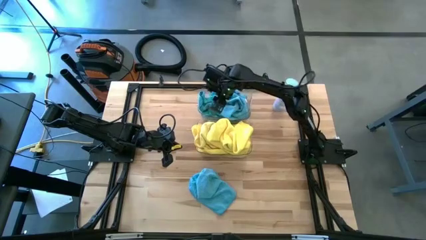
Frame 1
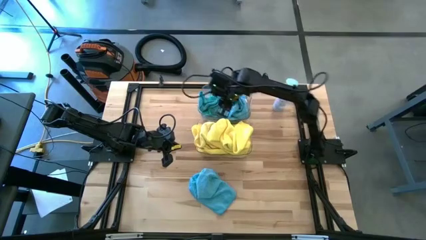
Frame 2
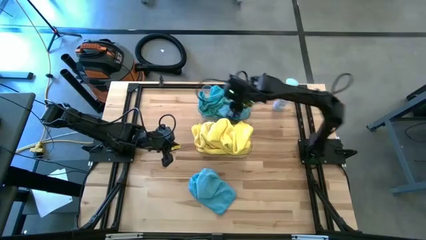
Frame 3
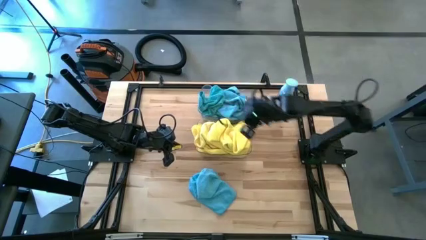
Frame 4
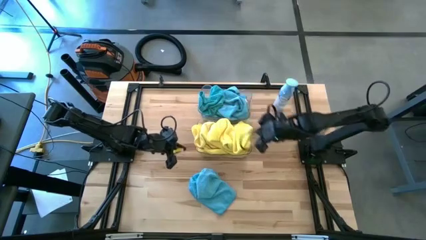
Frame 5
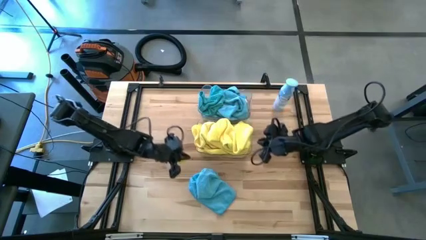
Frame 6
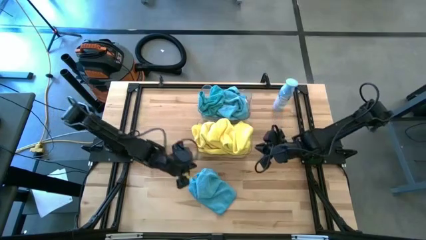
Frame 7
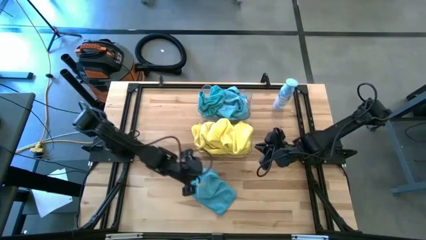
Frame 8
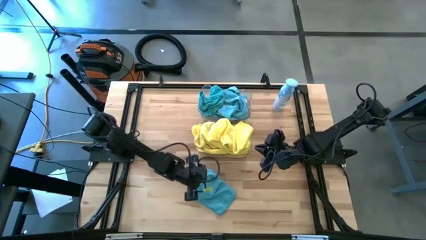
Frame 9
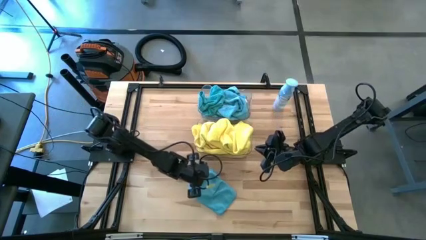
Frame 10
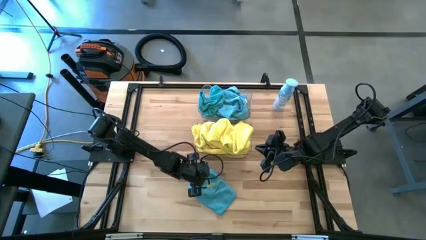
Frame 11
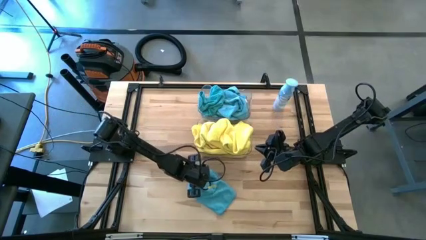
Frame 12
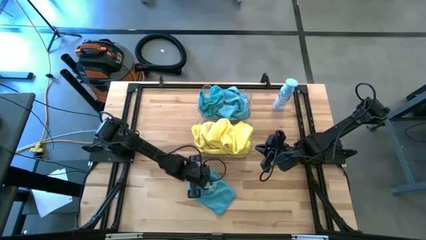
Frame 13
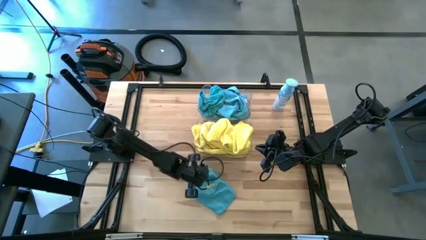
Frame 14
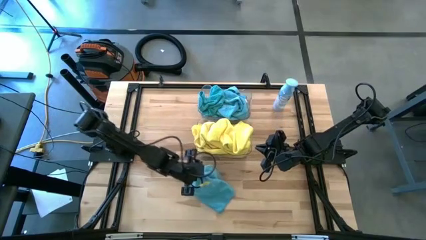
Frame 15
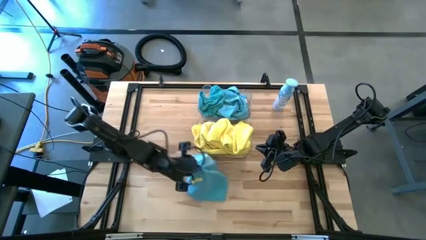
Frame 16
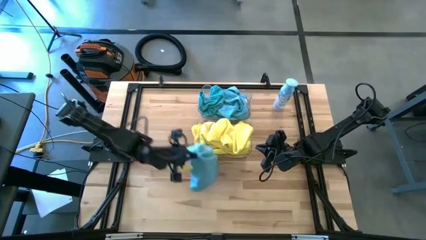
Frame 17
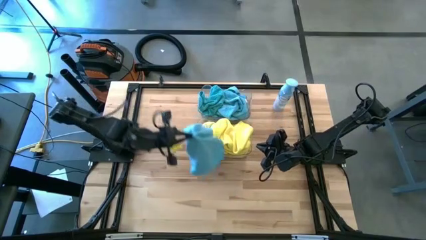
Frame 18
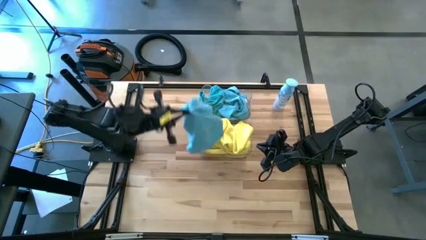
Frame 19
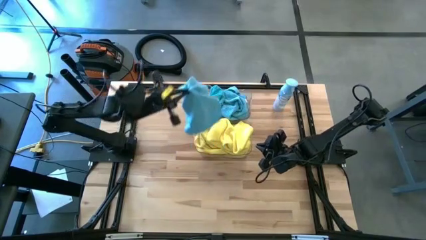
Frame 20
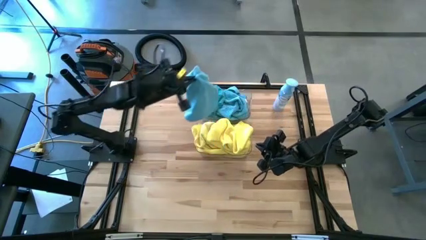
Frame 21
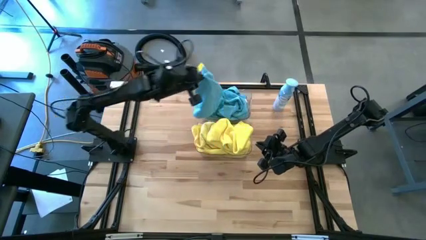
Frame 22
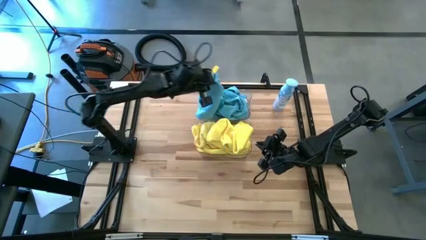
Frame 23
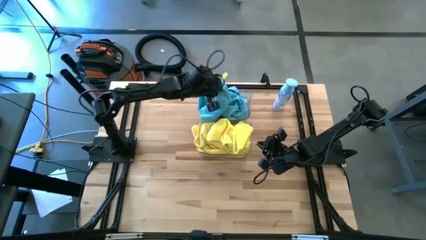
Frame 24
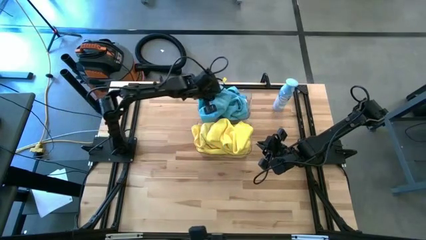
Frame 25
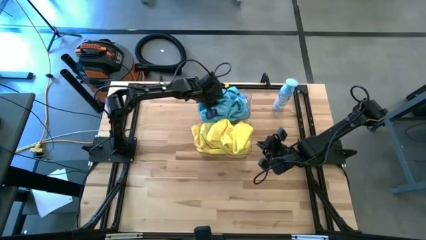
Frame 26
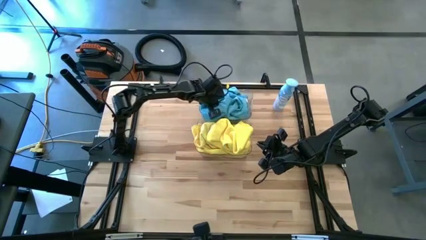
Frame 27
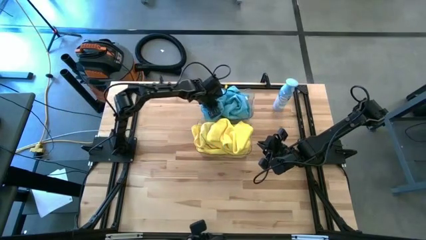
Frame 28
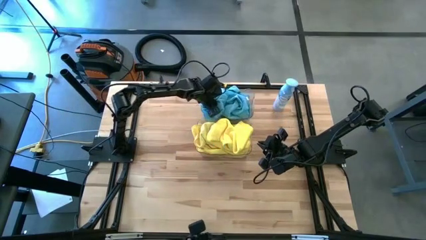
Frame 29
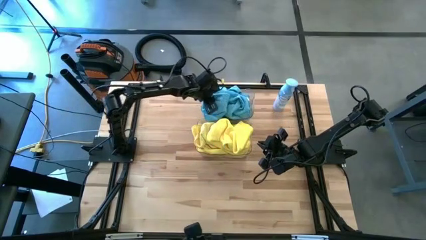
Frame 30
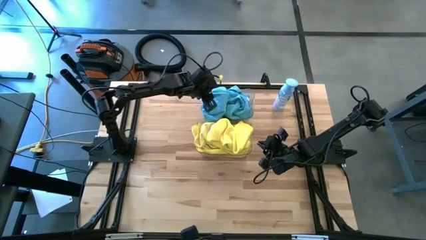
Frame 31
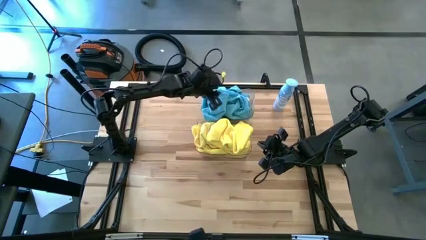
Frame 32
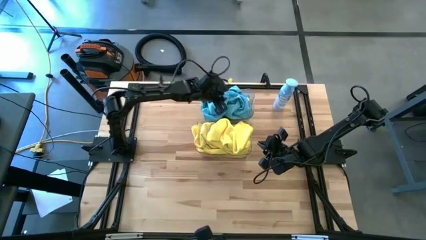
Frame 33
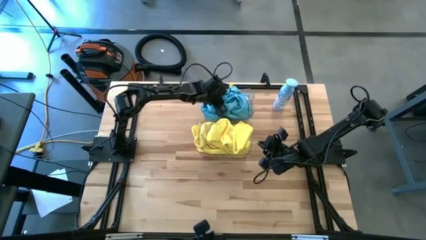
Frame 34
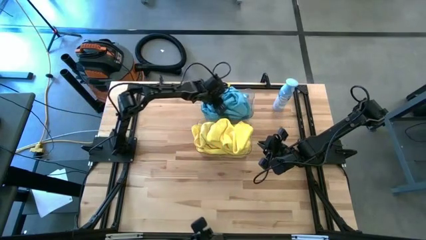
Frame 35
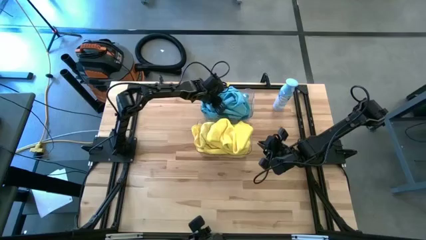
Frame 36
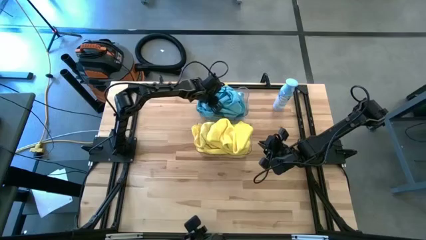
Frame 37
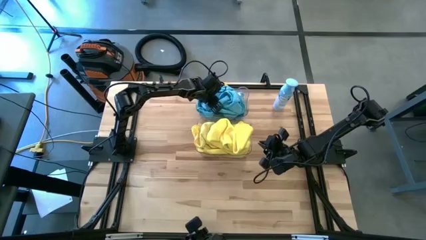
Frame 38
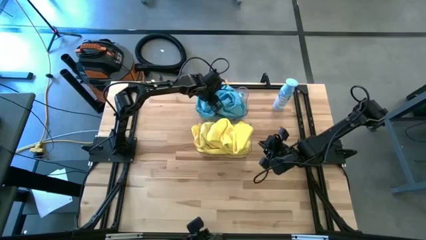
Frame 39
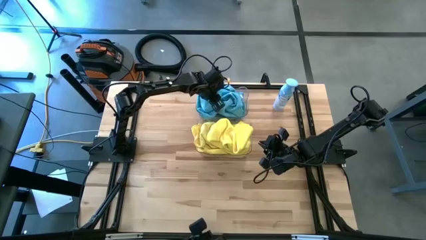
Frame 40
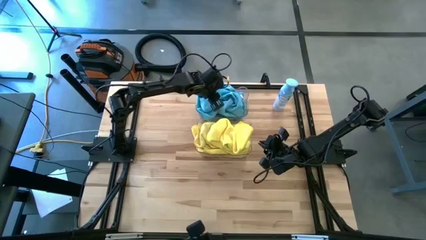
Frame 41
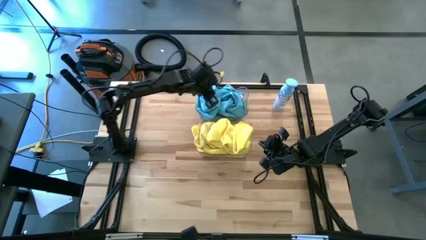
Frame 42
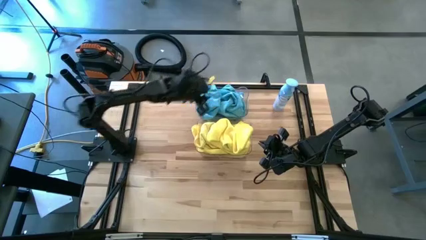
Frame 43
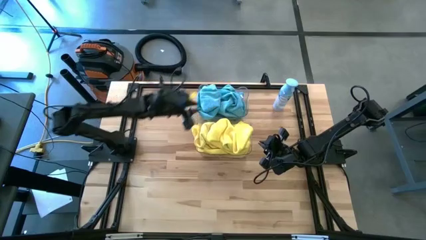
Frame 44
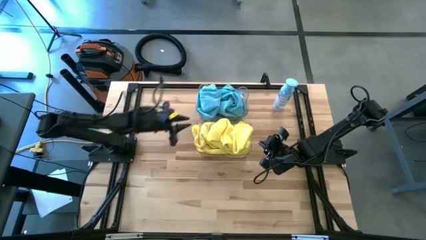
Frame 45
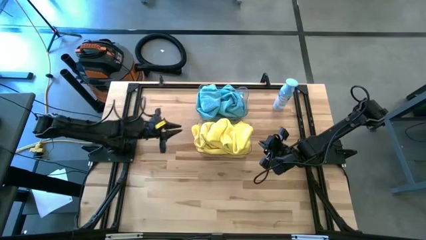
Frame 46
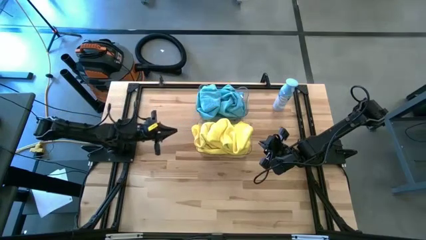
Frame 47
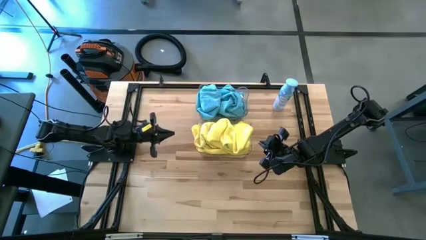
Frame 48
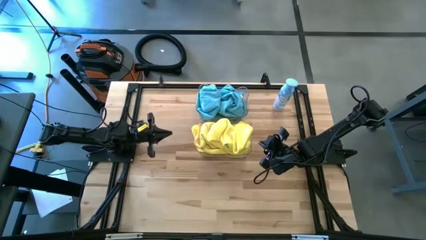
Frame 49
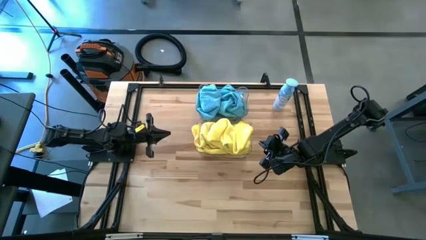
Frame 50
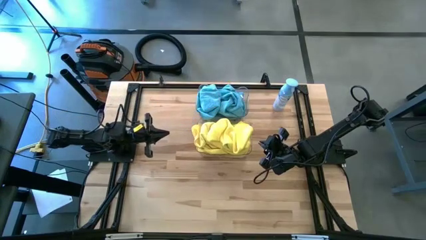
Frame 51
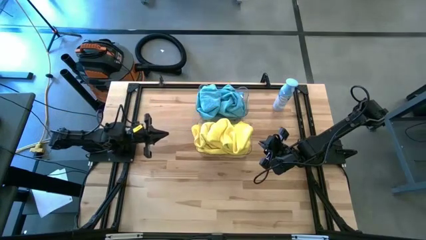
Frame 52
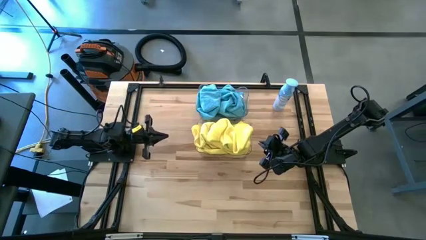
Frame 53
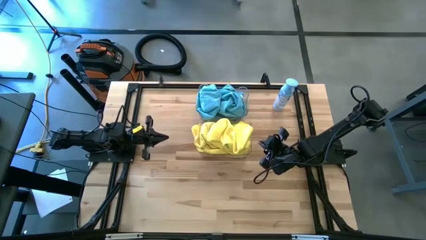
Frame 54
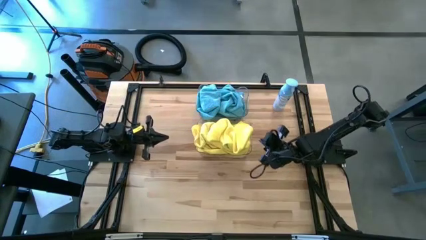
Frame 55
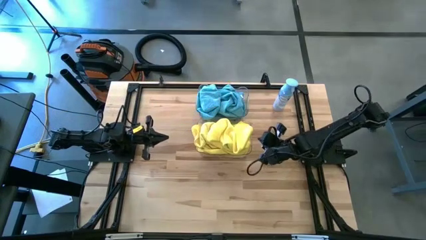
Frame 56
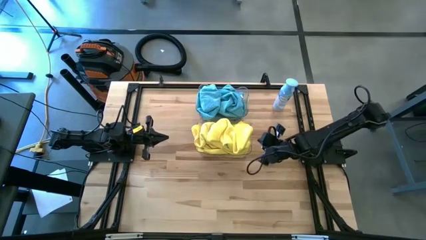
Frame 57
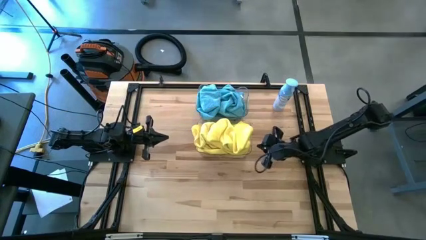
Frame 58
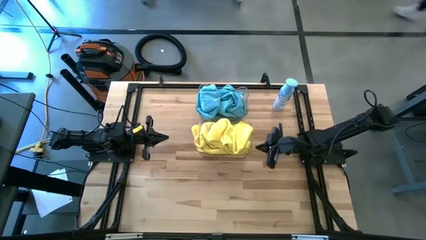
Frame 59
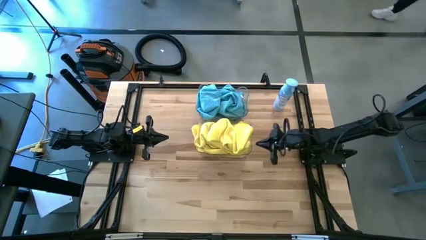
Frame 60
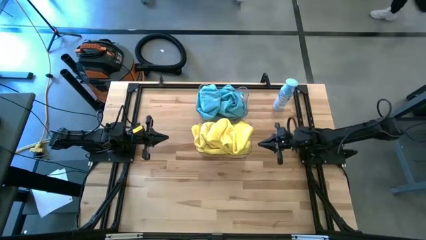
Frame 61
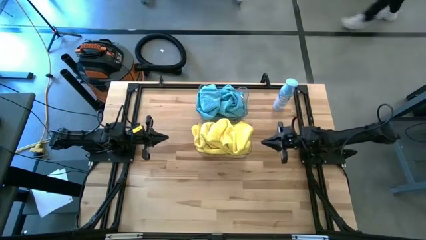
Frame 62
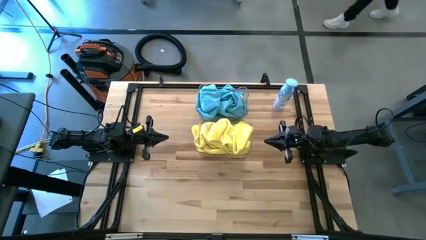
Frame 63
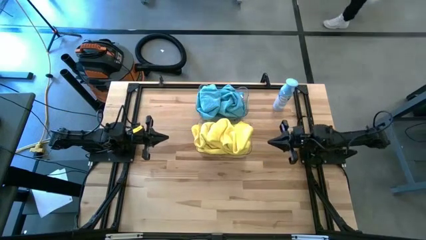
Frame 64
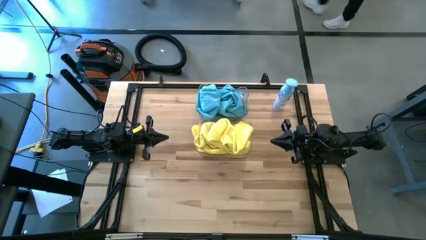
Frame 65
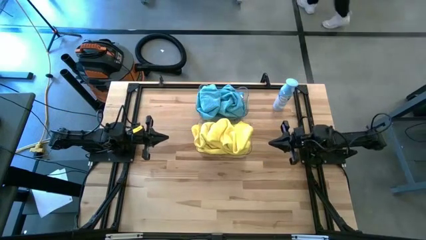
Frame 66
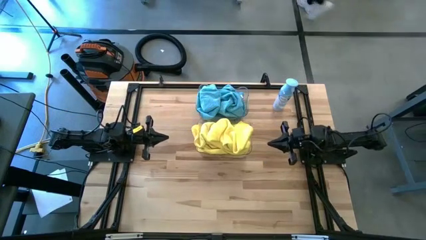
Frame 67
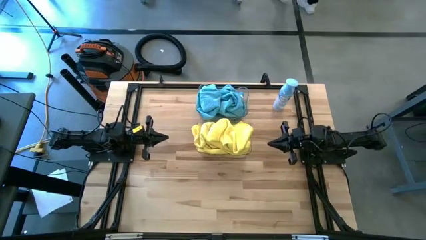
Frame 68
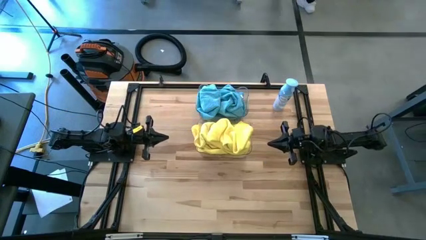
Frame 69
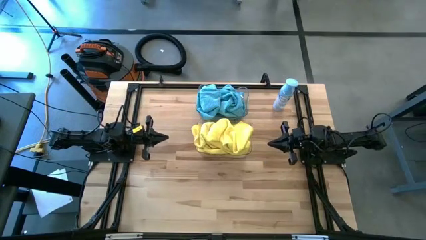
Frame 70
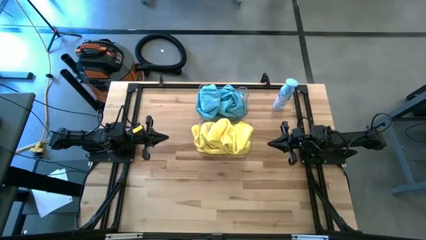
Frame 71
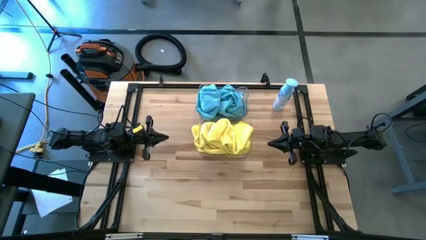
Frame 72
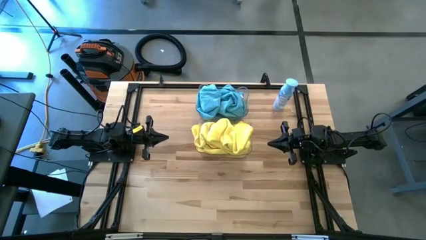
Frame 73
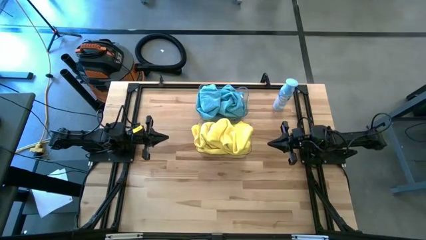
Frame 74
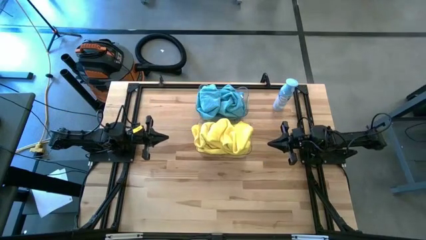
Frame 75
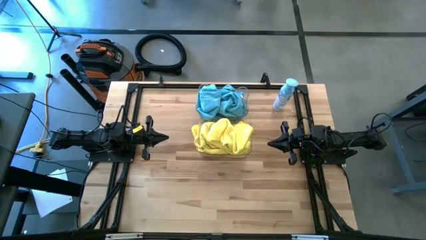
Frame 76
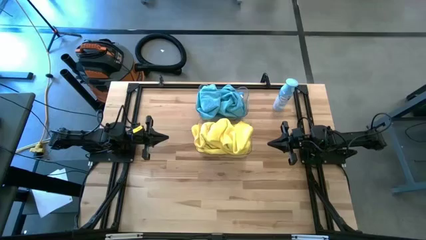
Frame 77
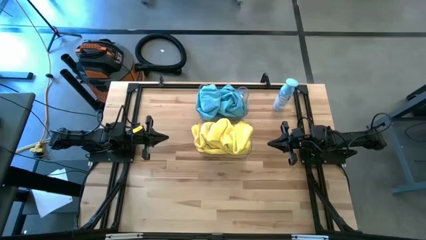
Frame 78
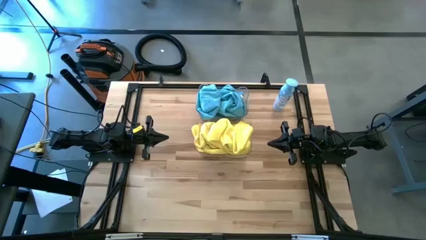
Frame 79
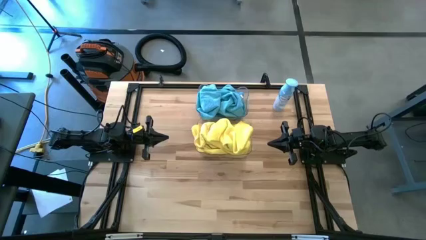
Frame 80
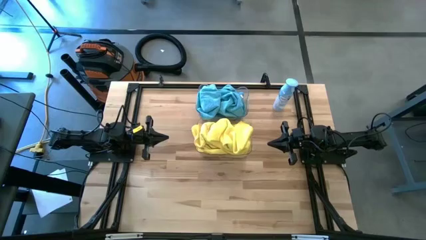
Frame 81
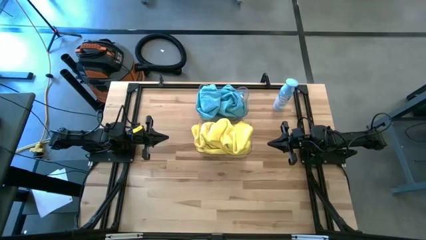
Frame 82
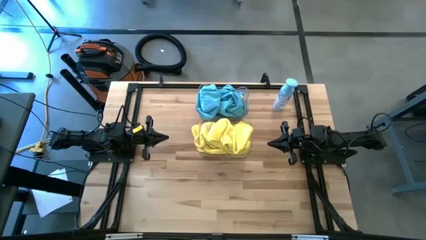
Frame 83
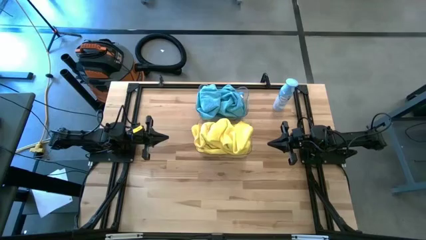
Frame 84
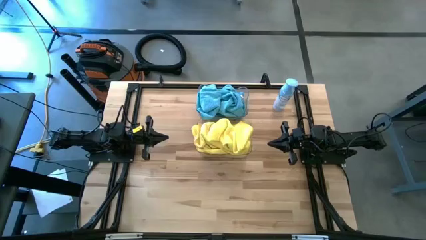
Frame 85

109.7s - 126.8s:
Task: Sort microfiber towel by color & place in baskets
Return to Home Position
